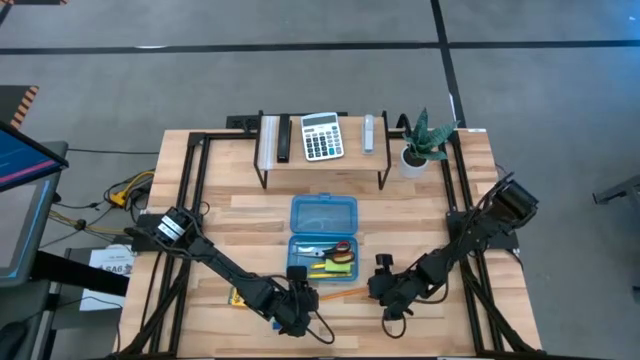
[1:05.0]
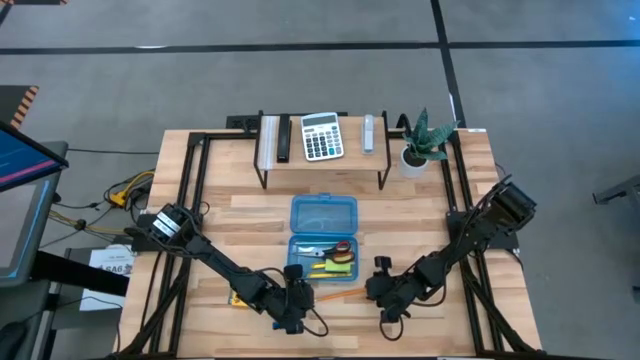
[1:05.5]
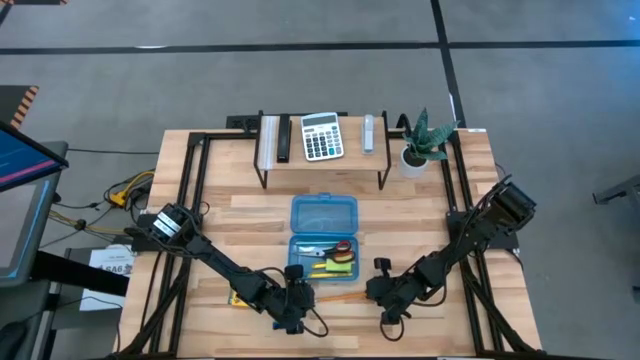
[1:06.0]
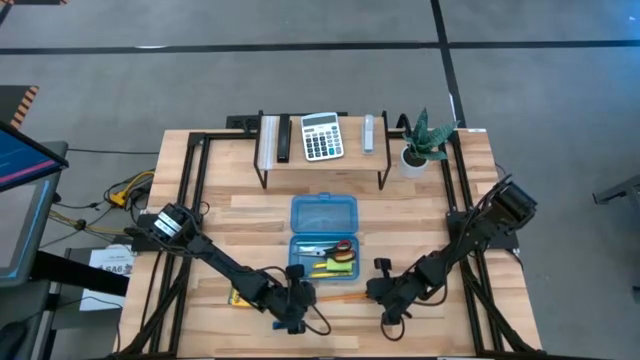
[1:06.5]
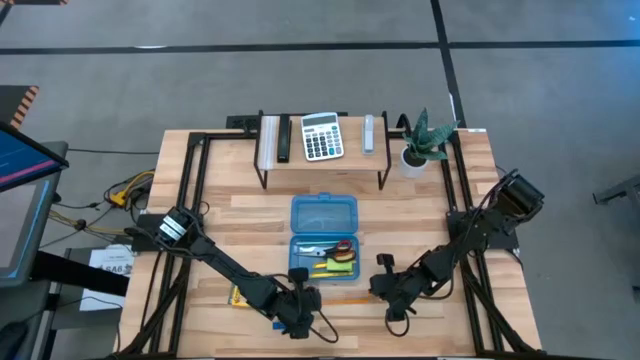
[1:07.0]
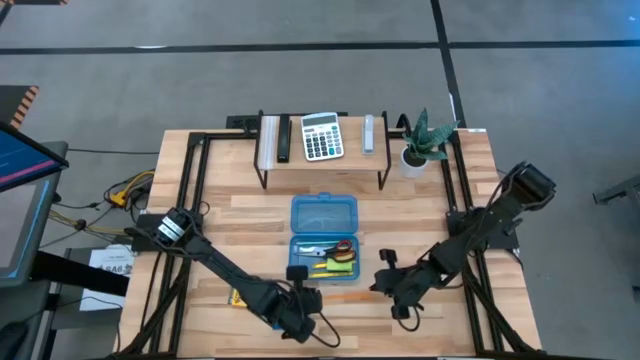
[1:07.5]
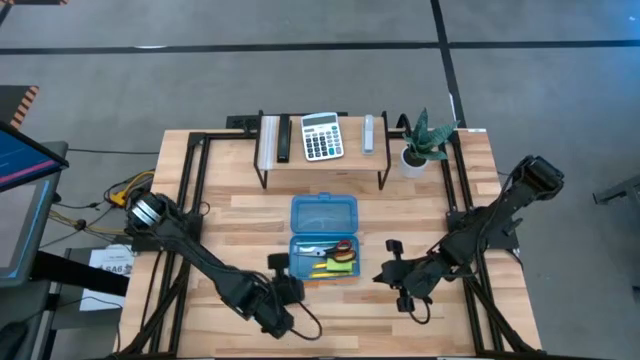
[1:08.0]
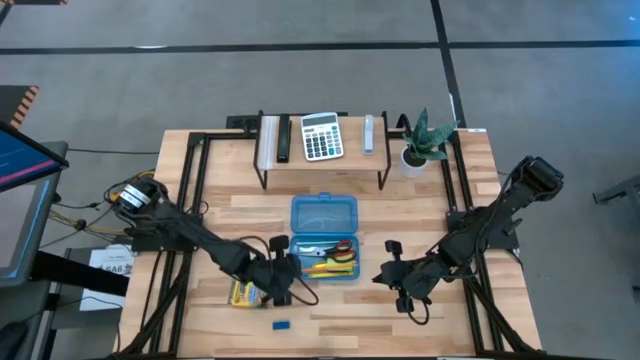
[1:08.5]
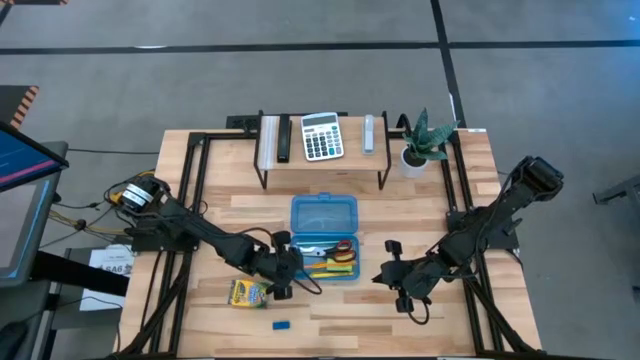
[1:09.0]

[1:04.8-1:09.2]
Task: Pack school essentials
Put the orange pencil into the blue supply box

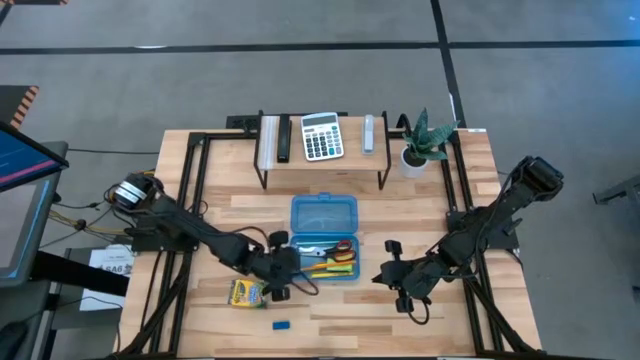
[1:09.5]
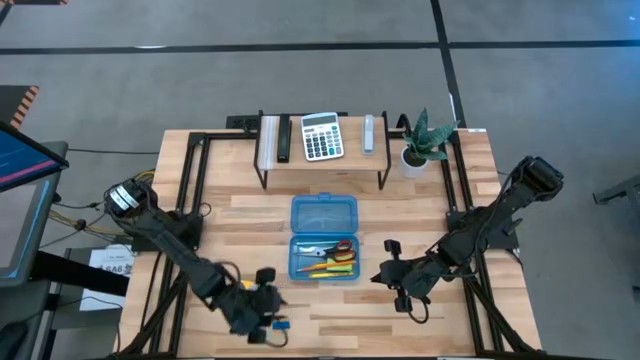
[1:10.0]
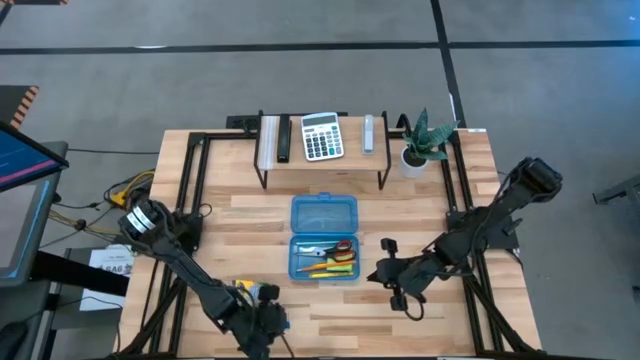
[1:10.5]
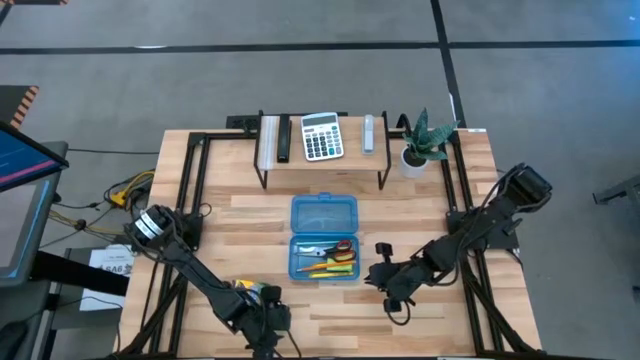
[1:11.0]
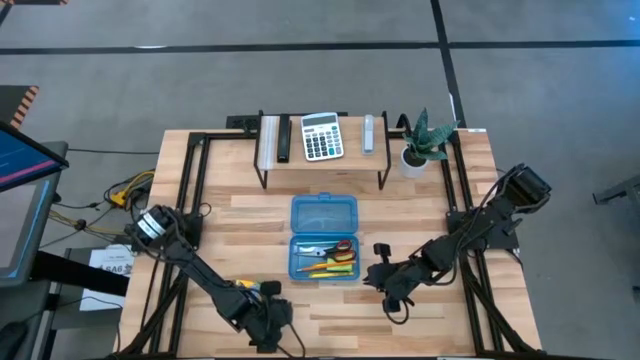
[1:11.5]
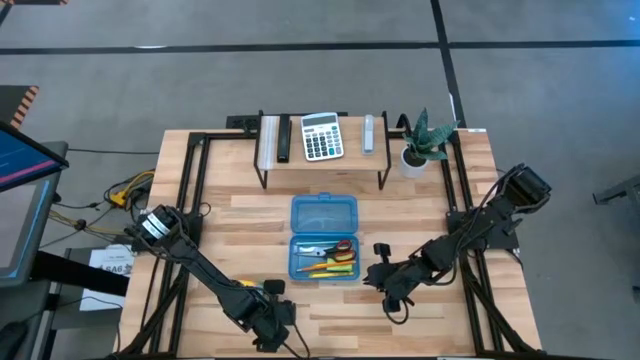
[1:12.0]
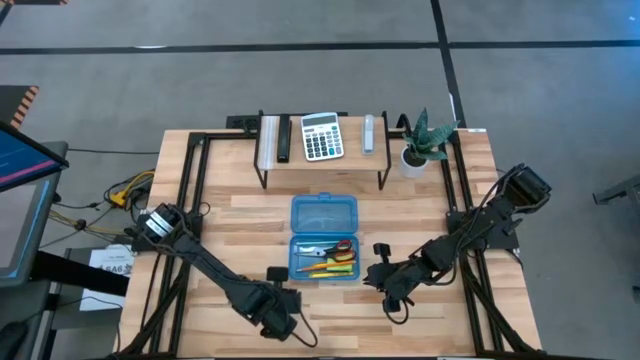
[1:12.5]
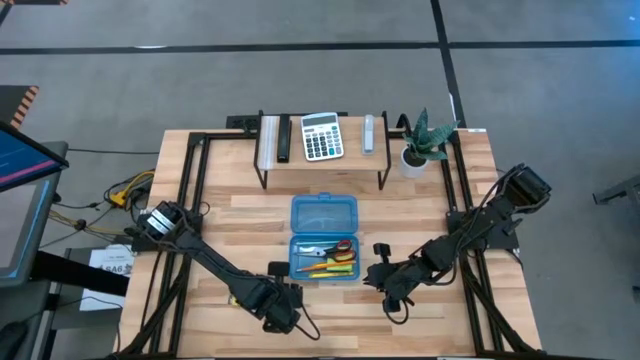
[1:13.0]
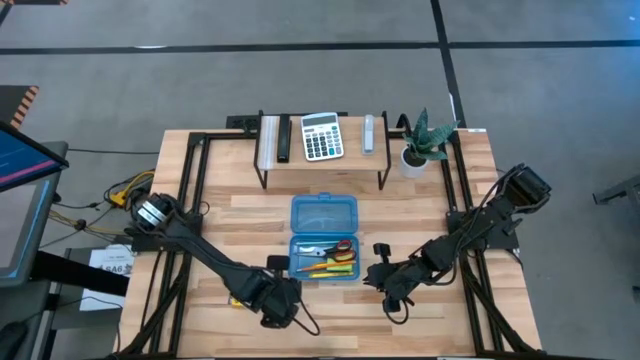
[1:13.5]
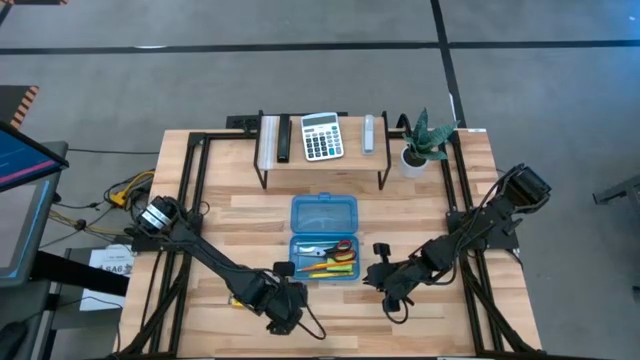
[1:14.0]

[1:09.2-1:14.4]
Put the blue eraser into the blue supply box

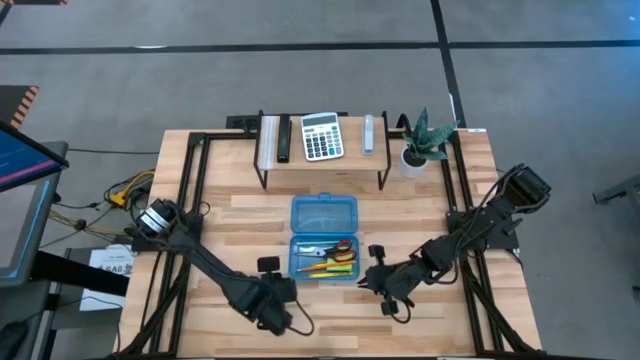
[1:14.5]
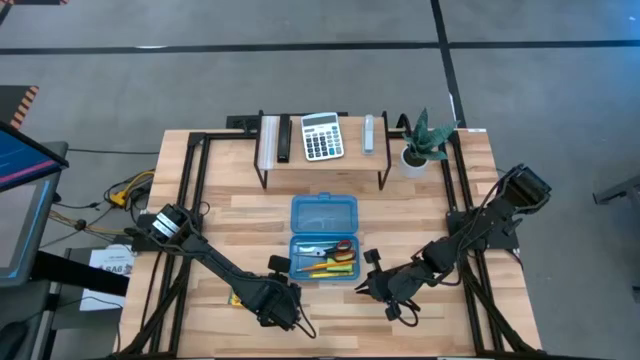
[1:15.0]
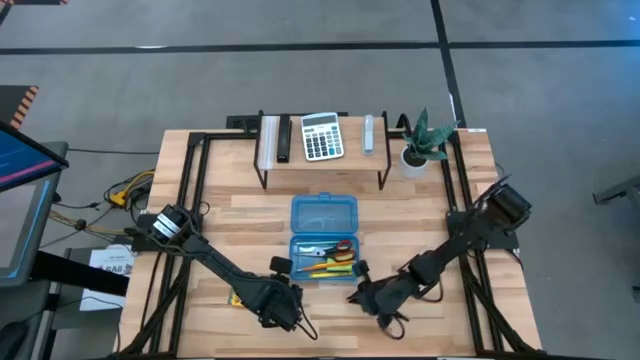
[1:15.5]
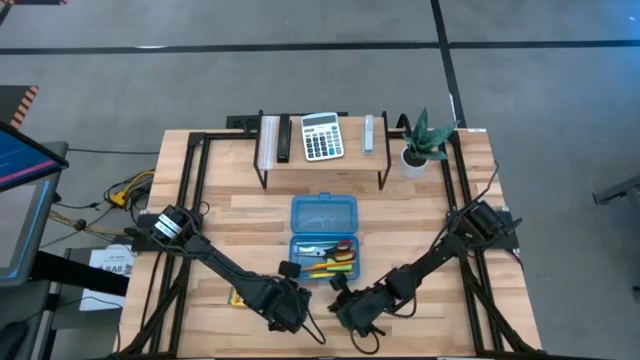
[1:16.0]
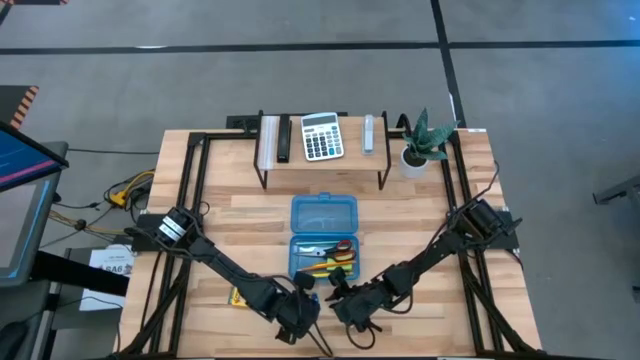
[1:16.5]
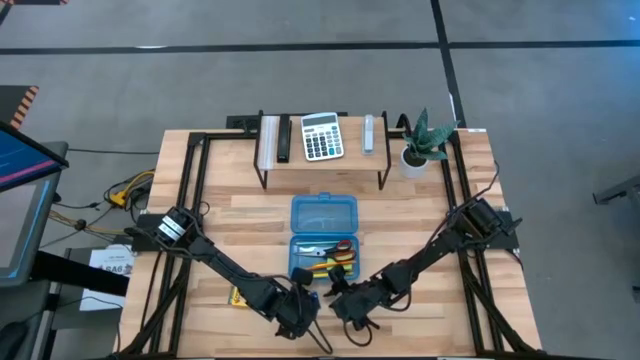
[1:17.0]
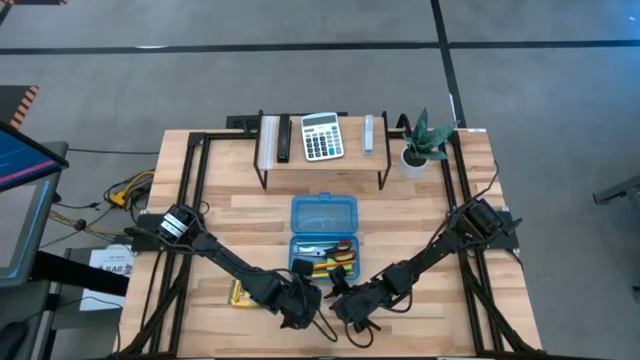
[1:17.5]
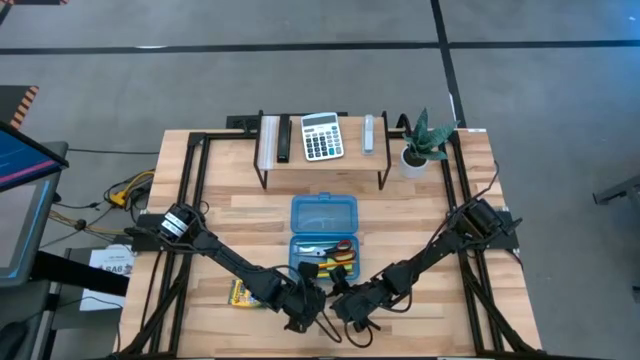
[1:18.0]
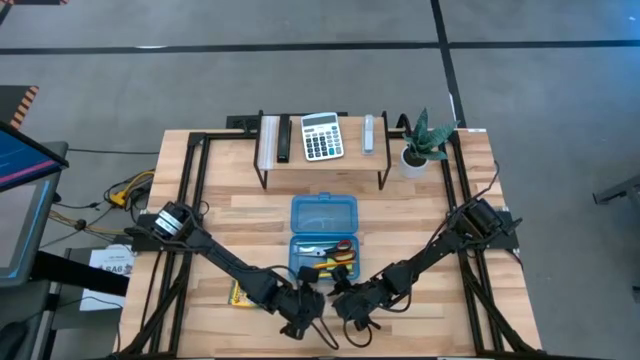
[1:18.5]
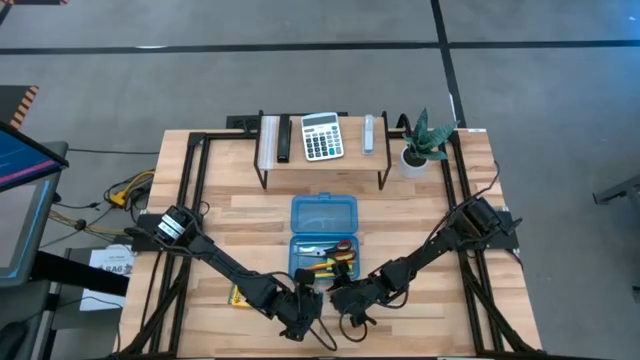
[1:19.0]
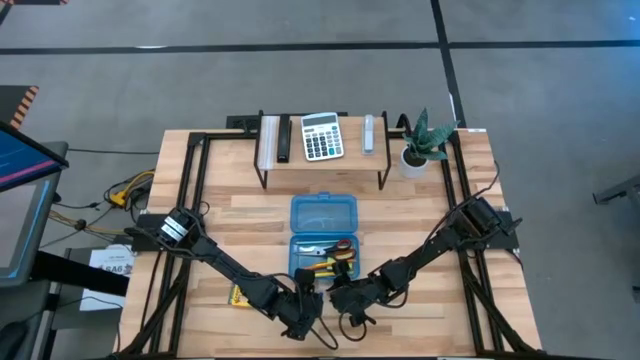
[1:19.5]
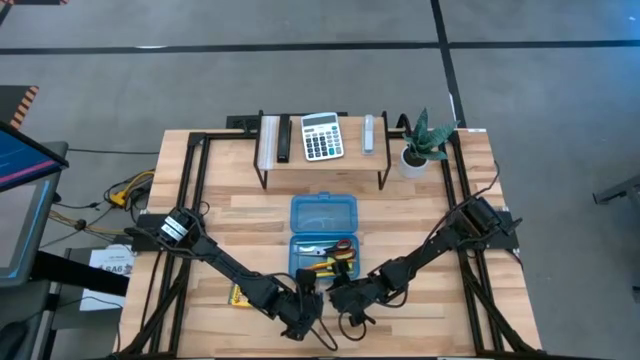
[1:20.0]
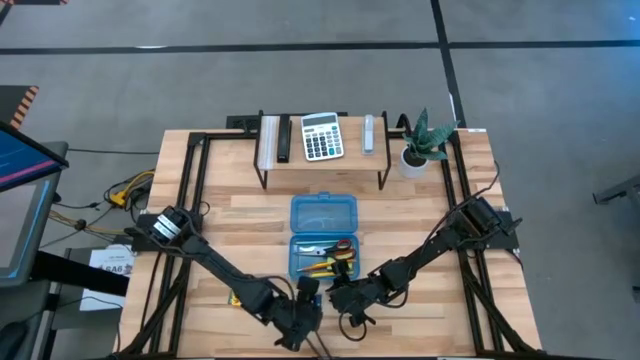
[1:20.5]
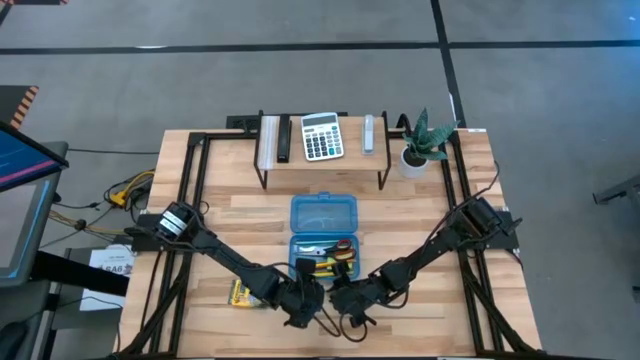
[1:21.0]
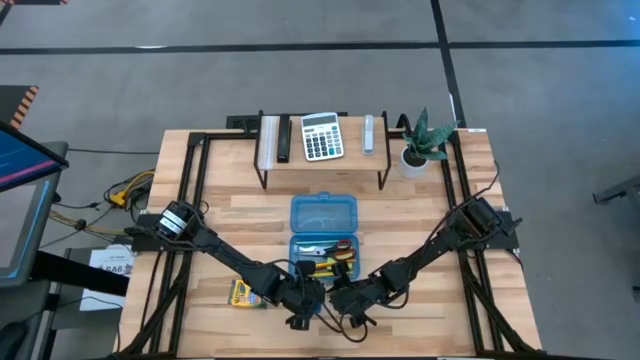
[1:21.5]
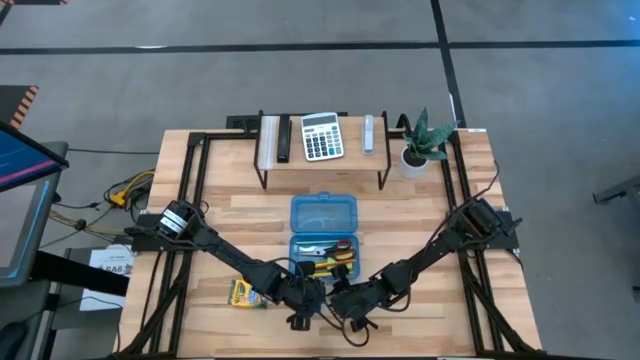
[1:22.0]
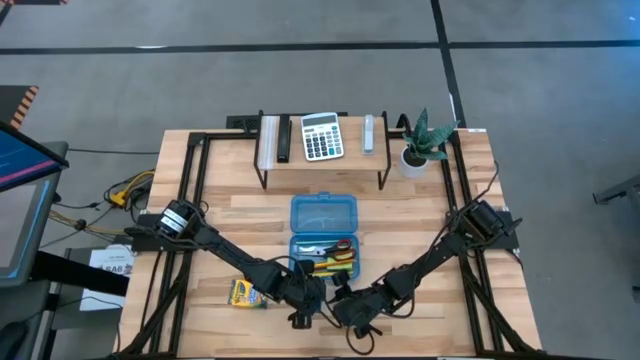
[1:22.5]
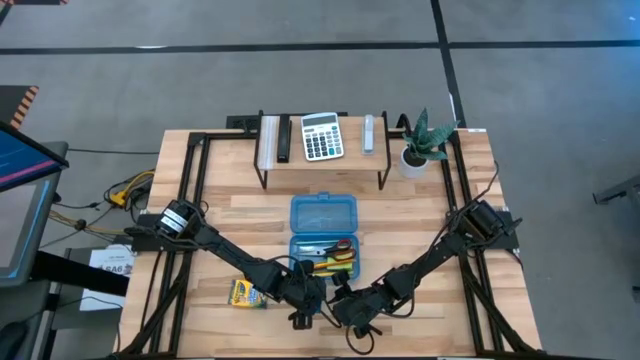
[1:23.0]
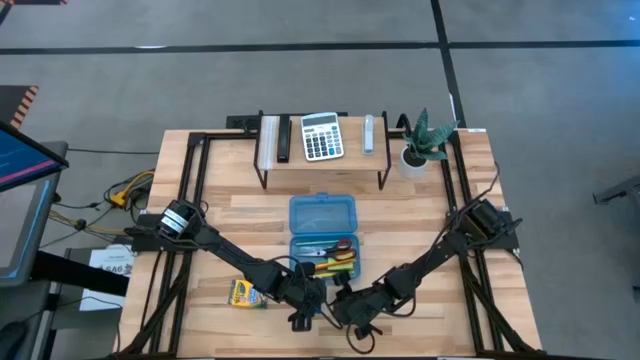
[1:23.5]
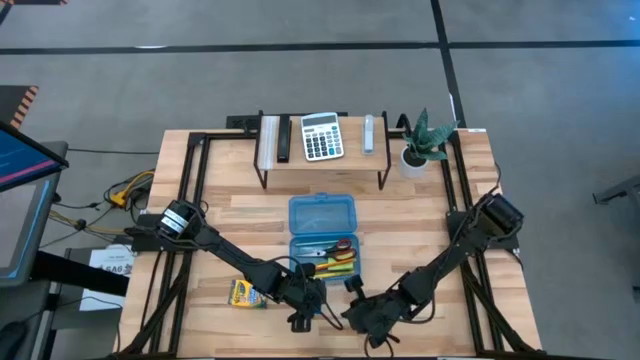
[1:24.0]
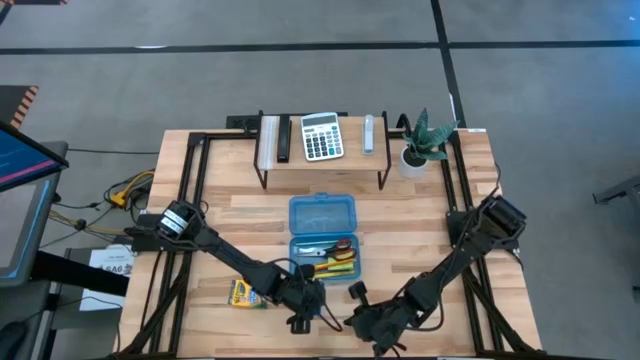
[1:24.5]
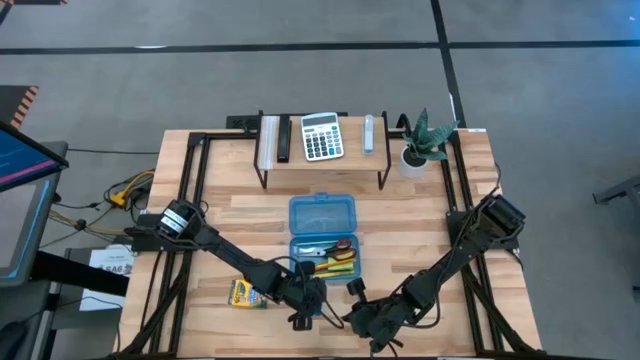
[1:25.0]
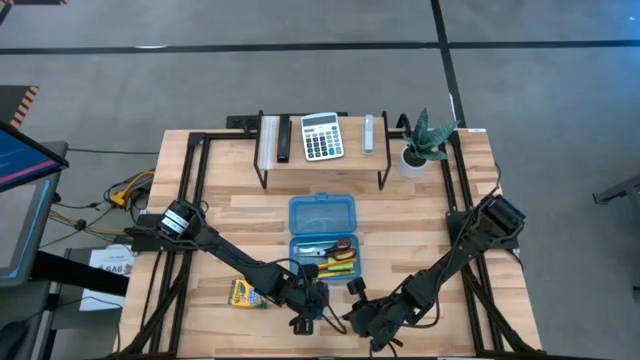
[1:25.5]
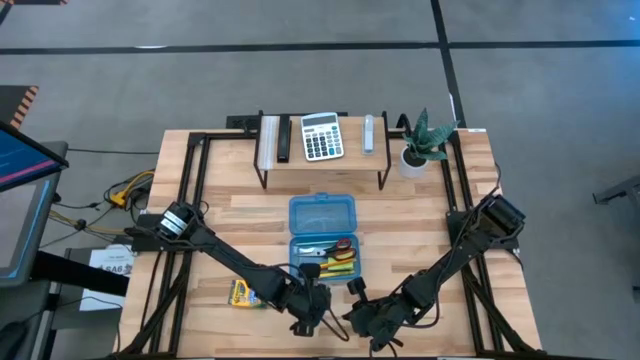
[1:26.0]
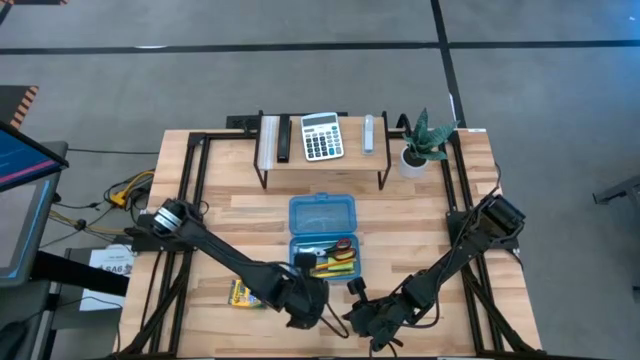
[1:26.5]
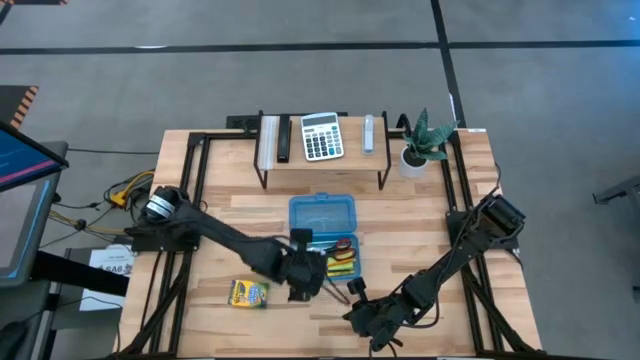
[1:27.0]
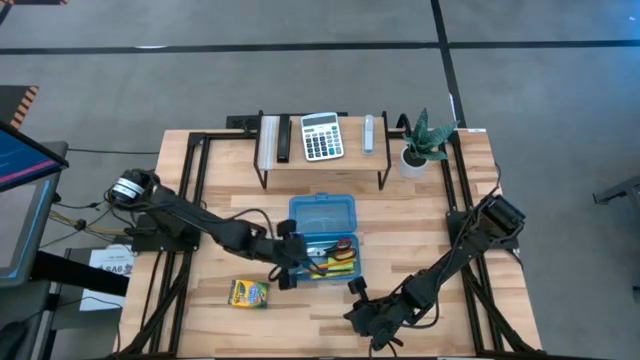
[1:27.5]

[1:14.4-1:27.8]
Put the blue eraser into the blue supply box
